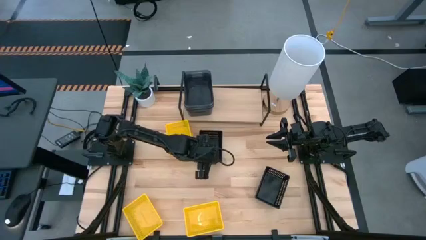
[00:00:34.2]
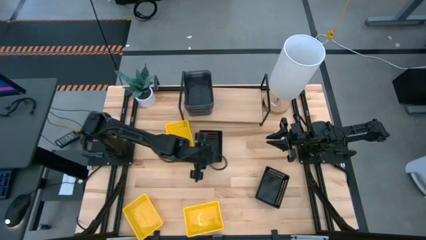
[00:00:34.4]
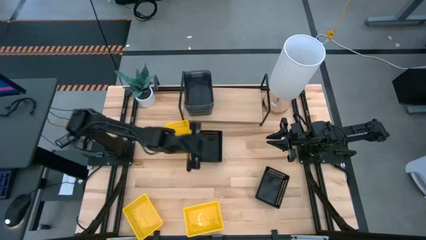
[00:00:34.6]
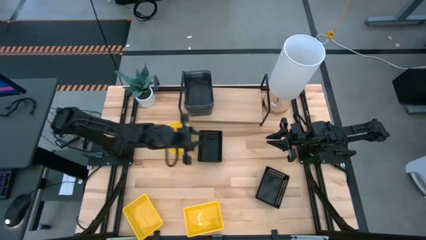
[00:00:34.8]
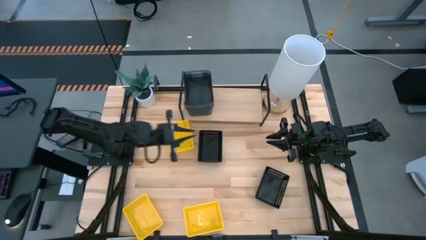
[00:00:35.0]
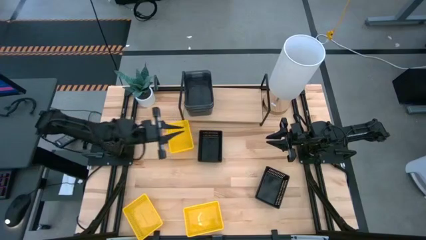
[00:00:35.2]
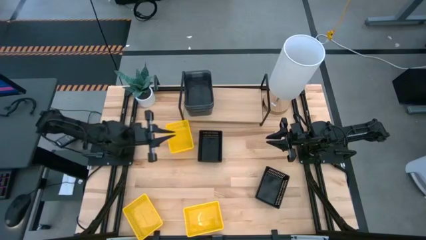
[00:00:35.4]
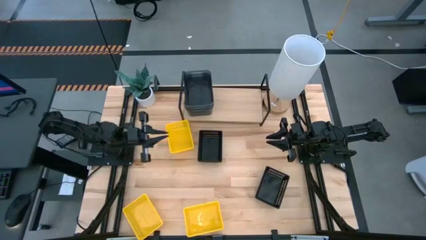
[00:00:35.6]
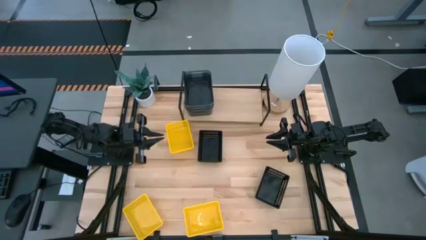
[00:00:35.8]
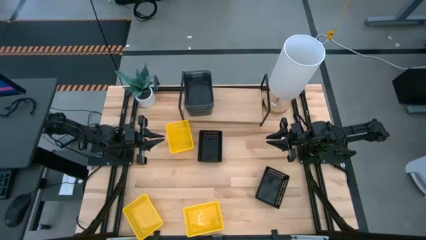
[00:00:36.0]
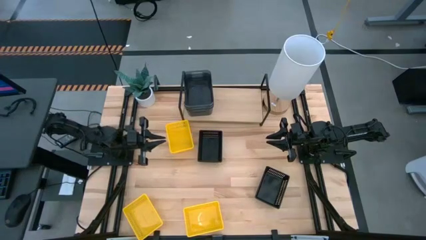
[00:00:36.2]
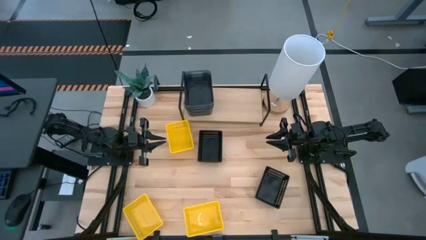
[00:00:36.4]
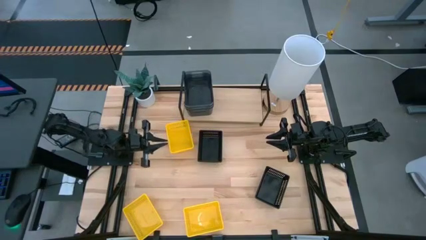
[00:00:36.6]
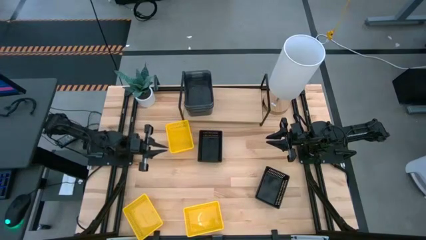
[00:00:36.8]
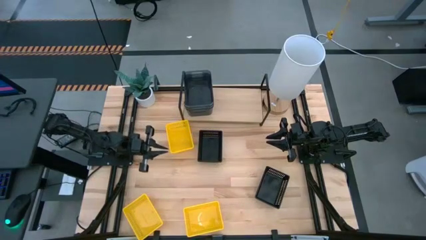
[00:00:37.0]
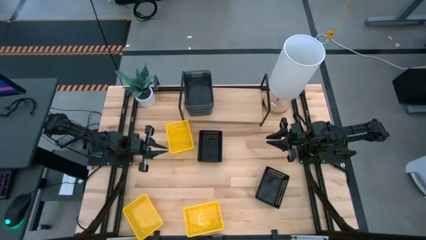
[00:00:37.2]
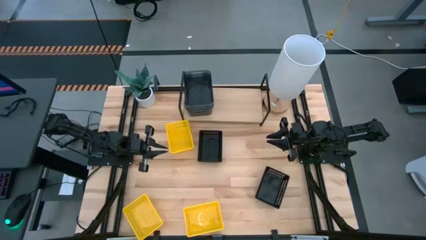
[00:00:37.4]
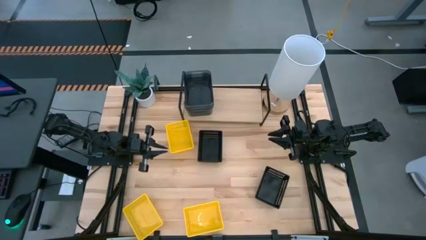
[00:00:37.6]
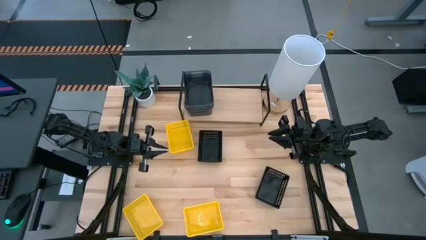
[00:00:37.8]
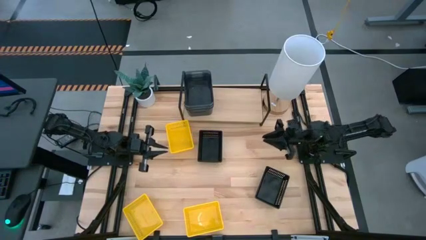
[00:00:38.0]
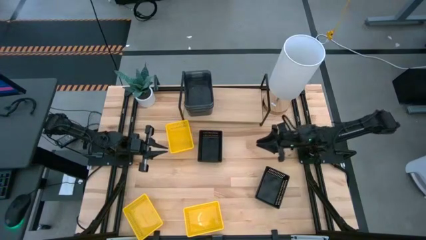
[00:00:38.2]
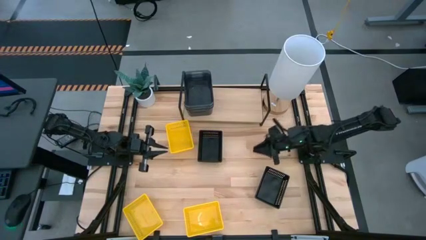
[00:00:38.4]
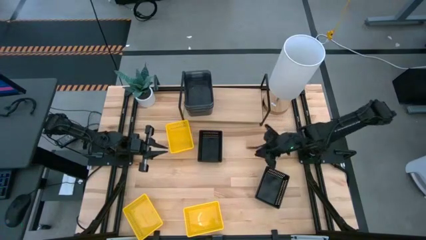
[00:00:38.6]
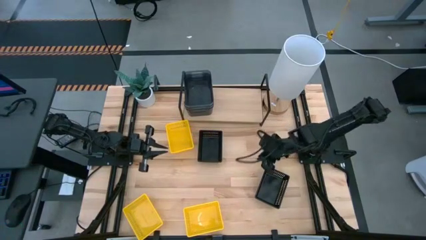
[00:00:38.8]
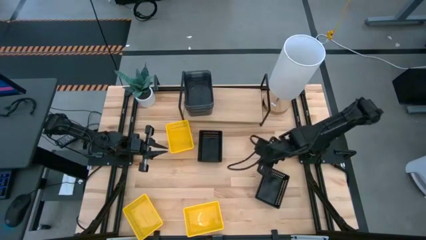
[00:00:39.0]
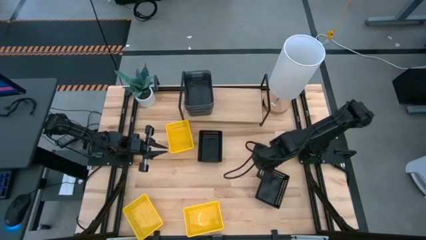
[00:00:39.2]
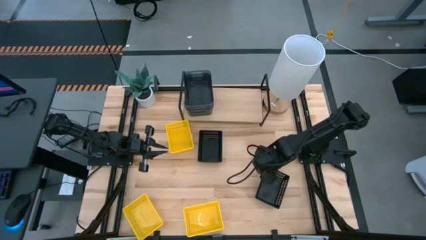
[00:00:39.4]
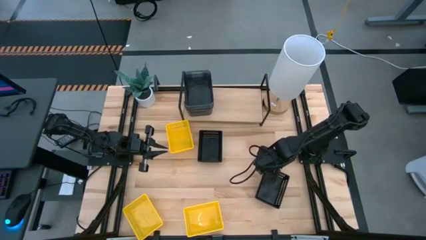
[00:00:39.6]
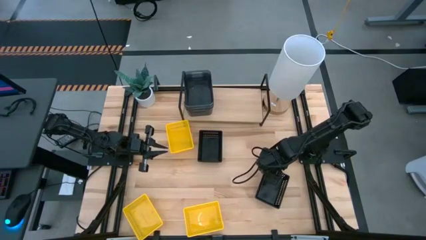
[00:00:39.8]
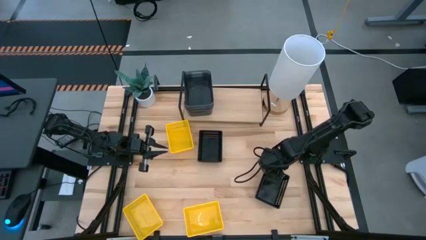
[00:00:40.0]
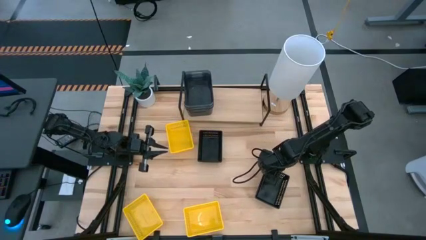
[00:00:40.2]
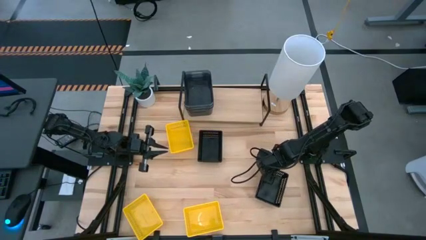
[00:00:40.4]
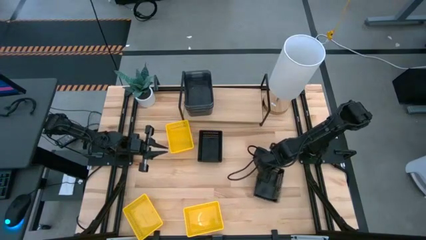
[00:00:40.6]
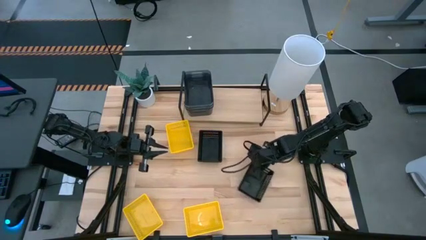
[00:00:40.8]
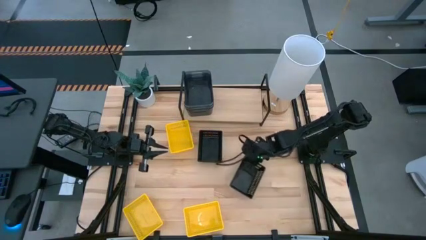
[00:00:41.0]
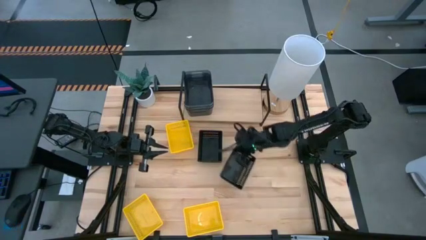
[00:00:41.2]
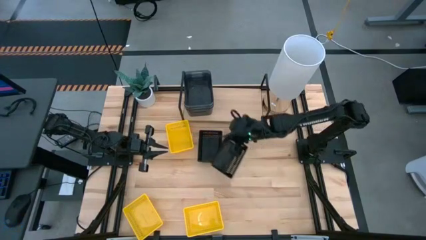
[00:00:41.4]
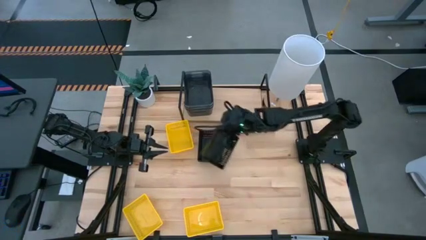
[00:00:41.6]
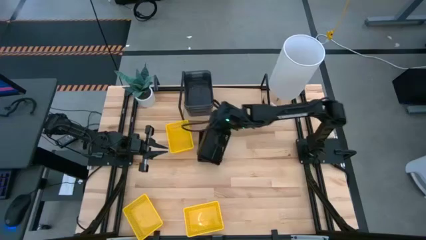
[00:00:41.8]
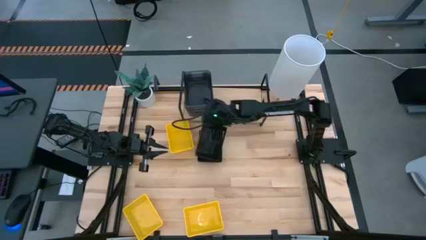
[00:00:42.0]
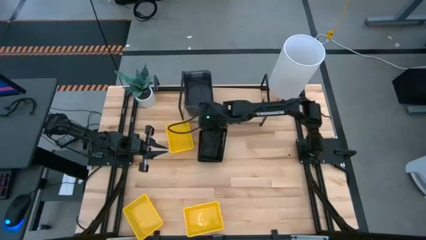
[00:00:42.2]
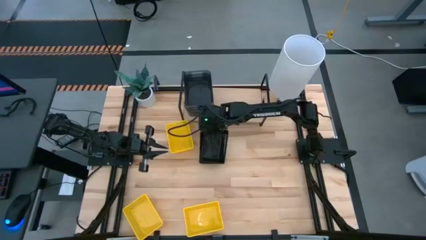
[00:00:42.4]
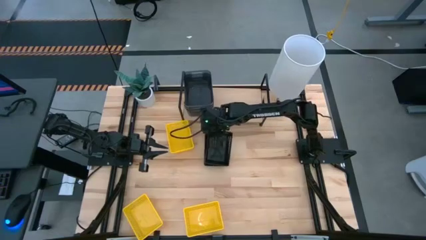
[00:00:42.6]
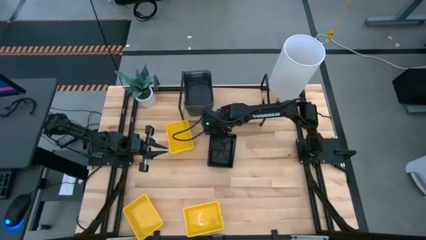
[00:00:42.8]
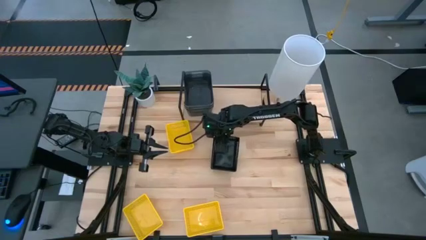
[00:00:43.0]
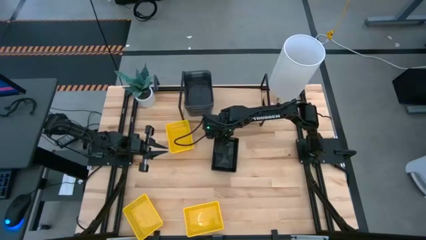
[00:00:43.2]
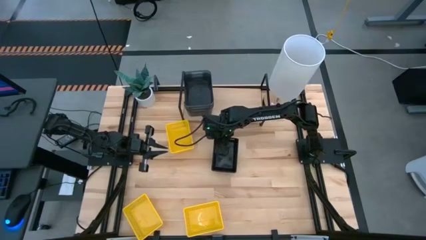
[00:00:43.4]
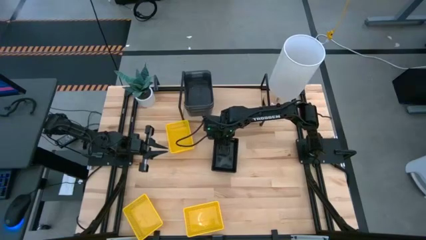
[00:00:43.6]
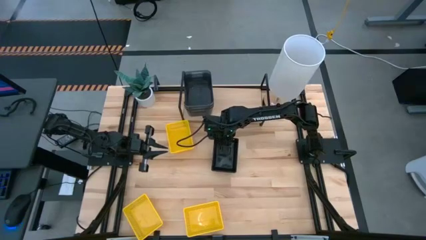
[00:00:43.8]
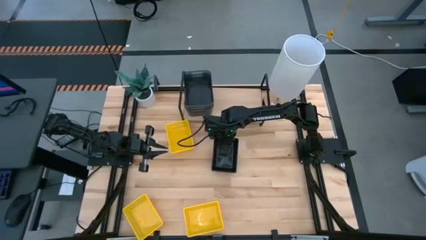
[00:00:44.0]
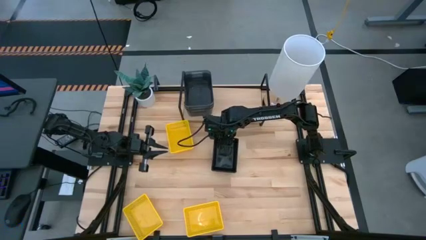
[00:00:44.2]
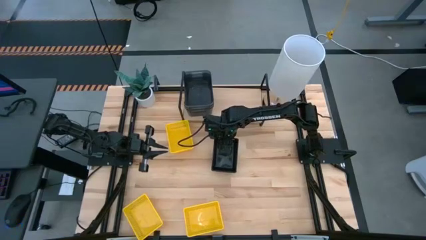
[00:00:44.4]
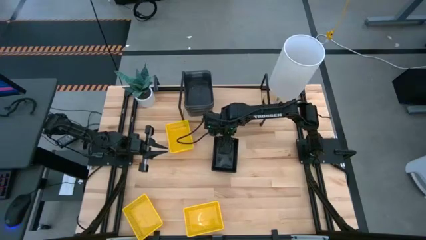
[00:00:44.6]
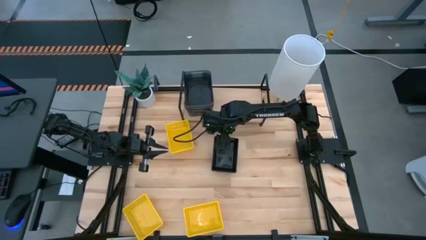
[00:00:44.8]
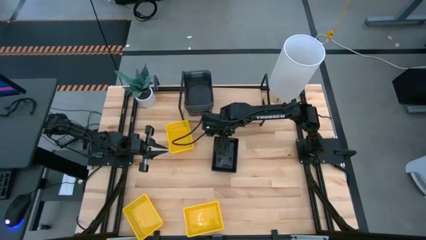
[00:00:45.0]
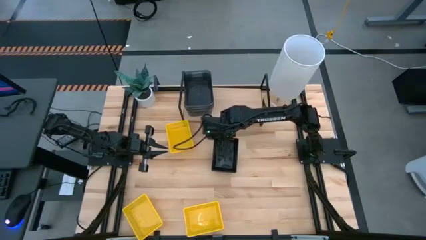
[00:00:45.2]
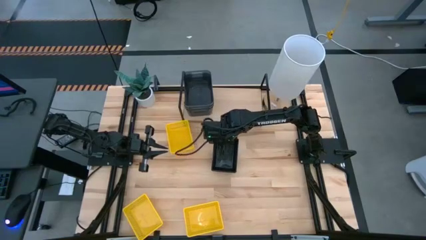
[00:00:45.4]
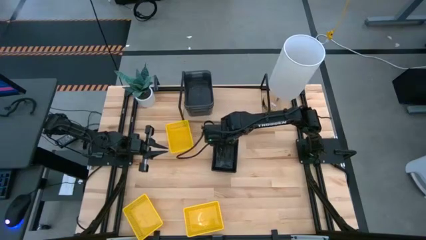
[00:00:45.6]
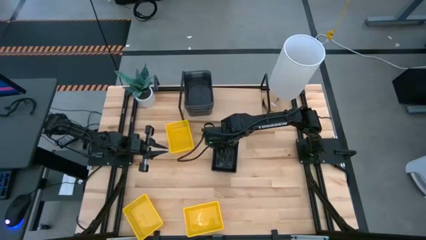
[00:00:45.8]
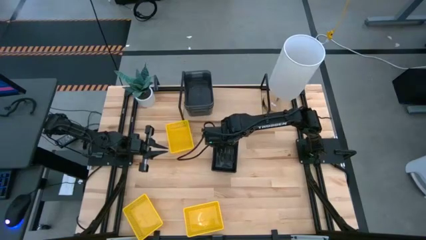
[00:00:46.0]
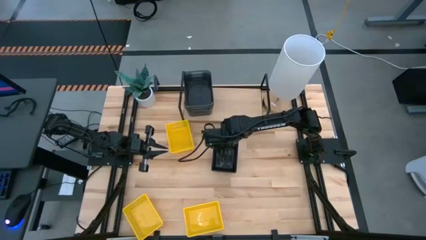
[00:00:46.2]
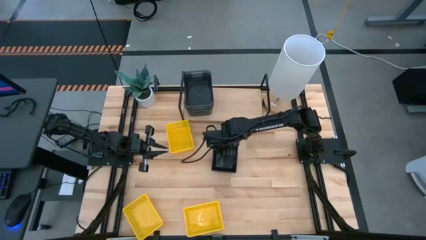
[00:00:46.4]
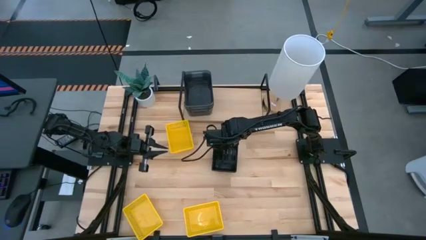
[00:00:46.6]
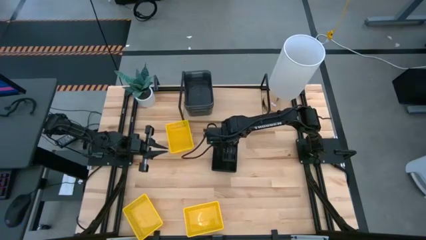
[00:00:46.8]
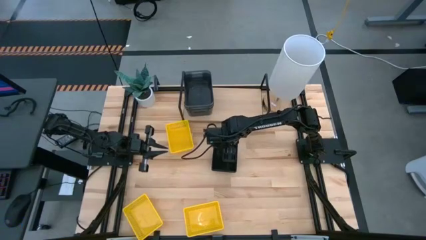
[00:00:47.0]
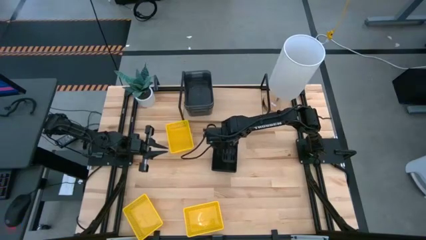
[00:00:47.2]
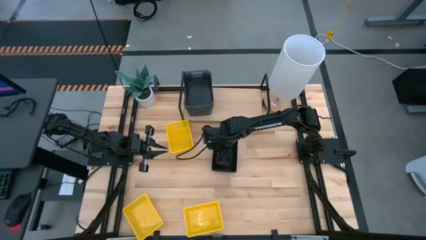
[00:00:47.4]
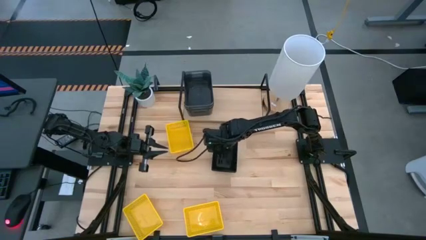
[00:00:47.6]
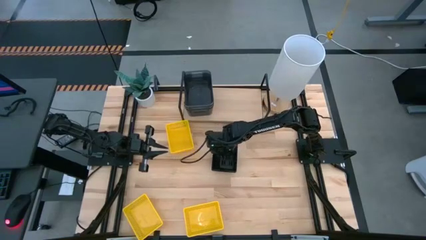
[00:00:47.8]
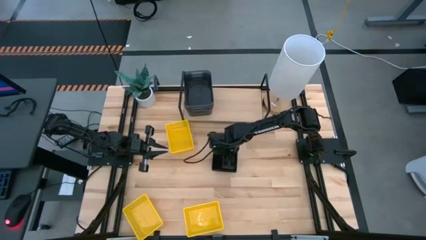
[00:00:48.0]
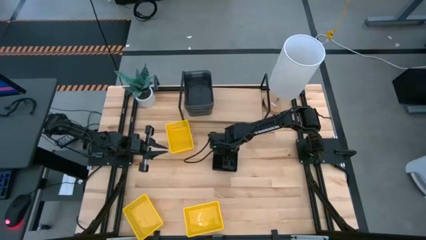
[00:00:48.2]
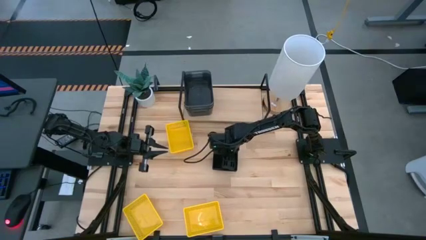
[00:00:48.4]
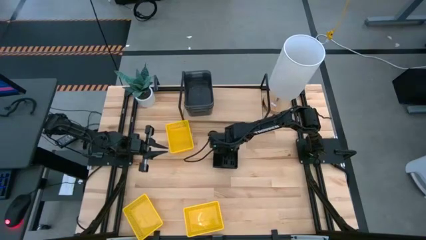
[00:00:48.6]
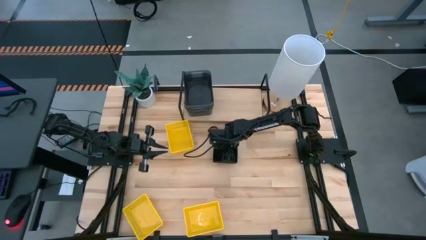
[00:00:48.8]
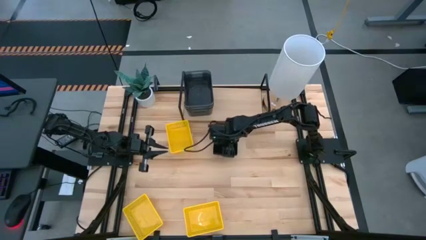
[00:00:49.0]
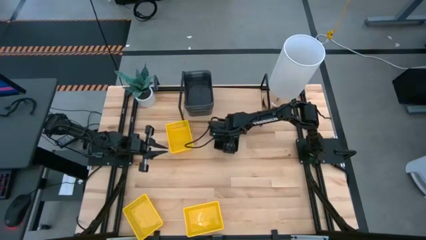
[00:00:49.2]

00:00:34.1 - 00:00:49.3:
Task: Stack baskets on shelf by color
Stack the bottom black bin on the stacked black bins
